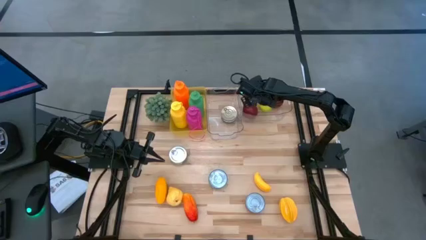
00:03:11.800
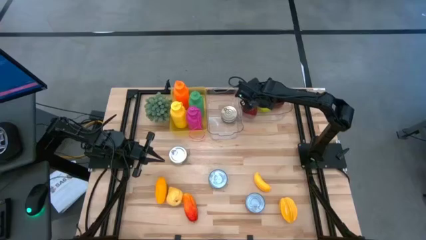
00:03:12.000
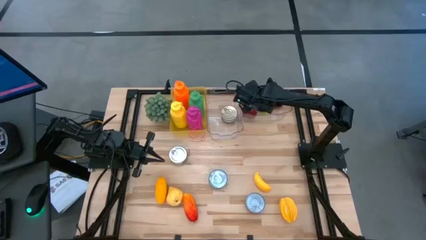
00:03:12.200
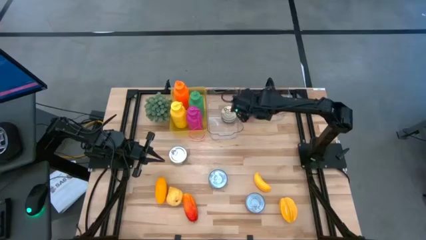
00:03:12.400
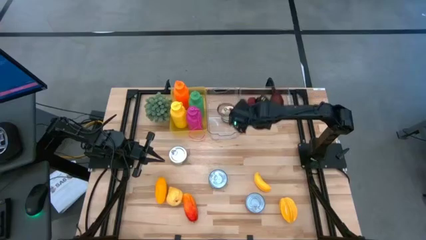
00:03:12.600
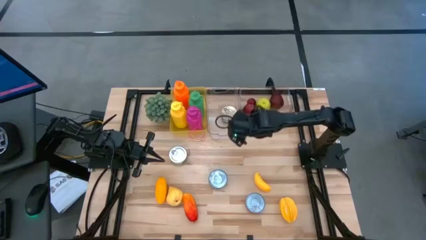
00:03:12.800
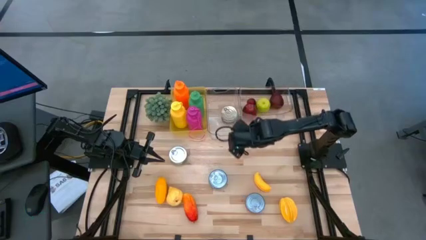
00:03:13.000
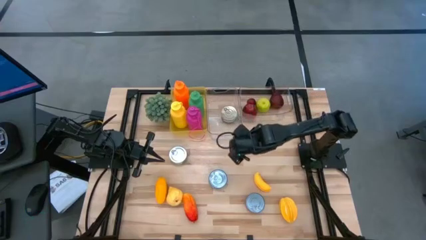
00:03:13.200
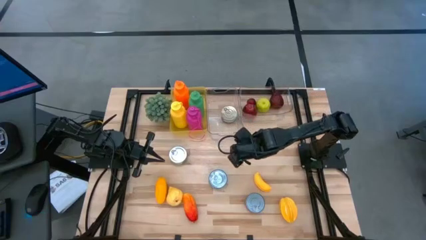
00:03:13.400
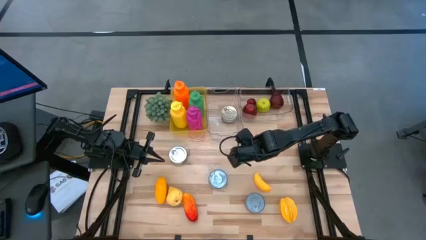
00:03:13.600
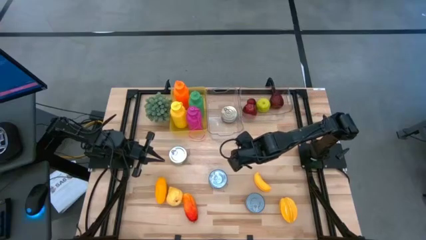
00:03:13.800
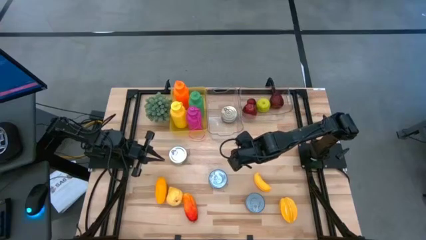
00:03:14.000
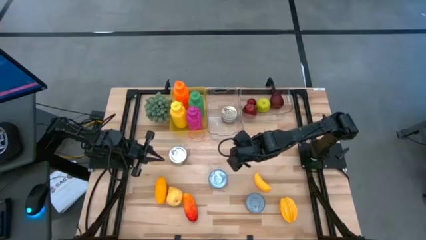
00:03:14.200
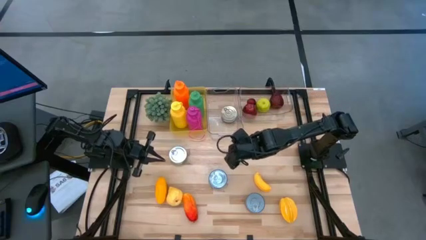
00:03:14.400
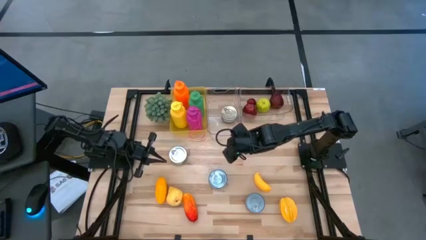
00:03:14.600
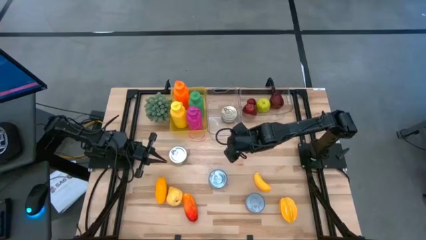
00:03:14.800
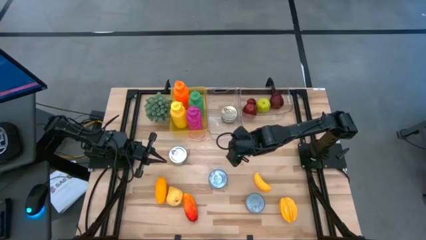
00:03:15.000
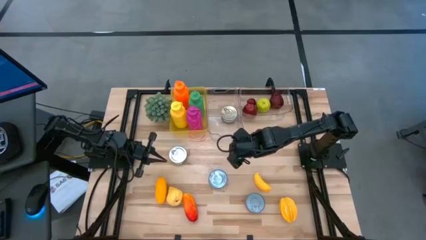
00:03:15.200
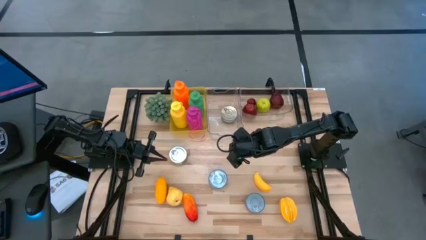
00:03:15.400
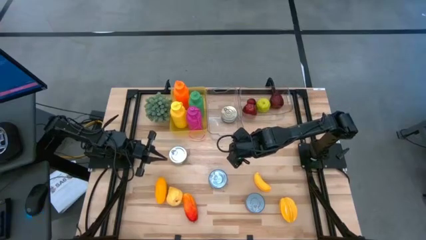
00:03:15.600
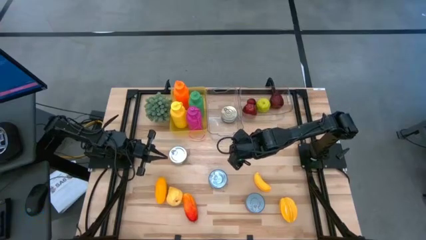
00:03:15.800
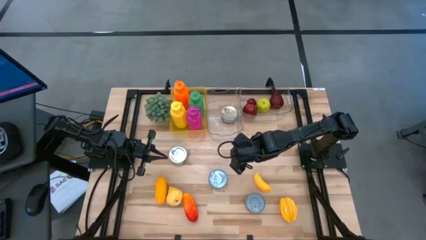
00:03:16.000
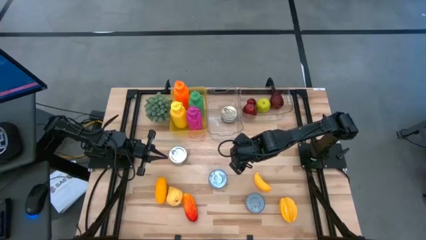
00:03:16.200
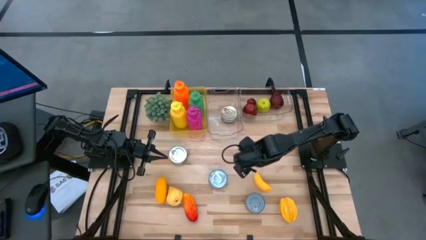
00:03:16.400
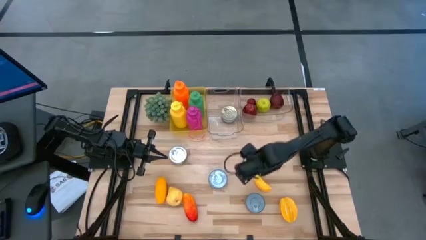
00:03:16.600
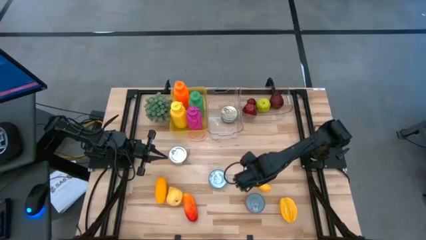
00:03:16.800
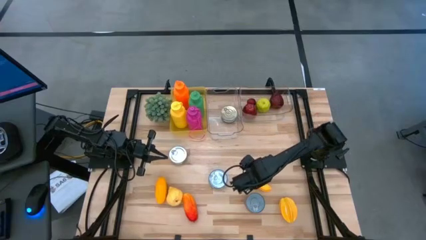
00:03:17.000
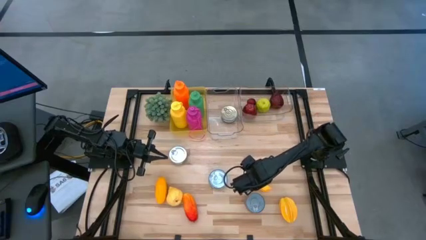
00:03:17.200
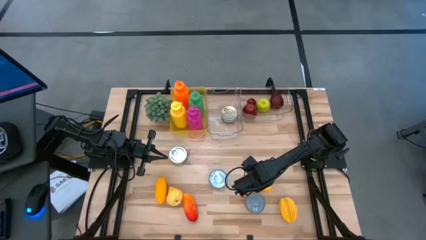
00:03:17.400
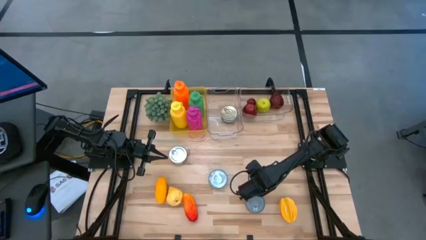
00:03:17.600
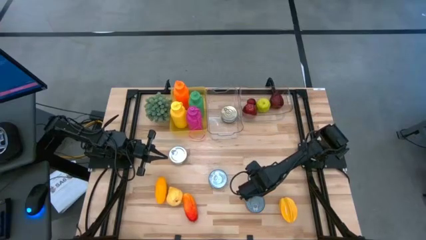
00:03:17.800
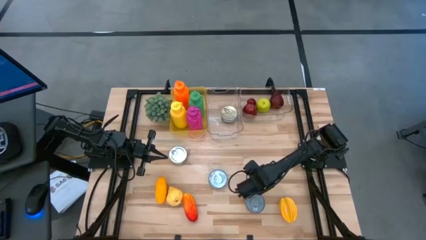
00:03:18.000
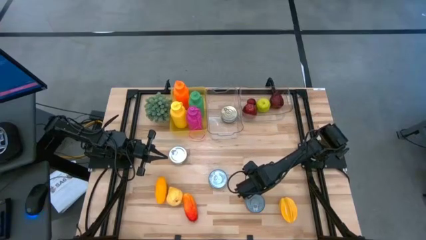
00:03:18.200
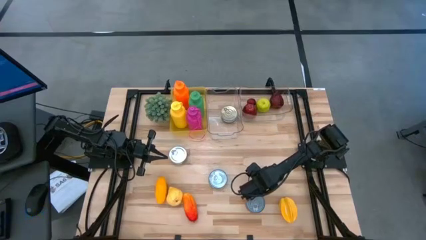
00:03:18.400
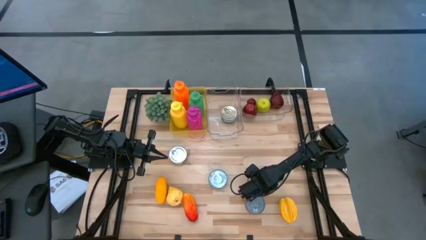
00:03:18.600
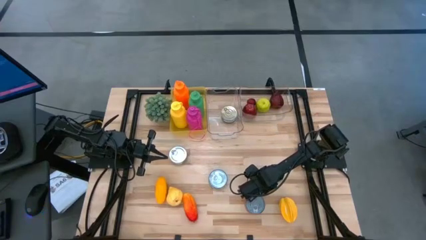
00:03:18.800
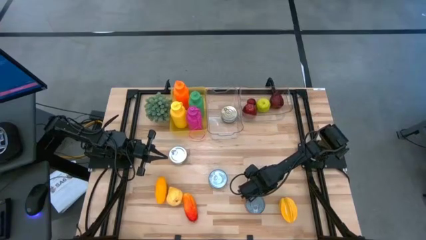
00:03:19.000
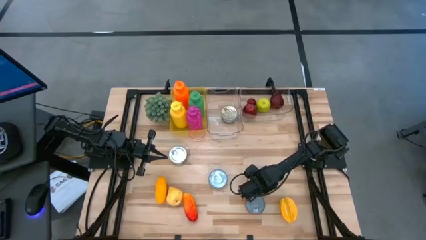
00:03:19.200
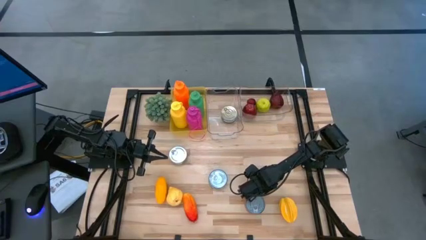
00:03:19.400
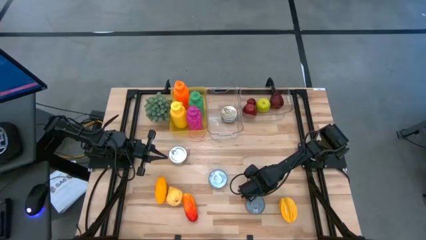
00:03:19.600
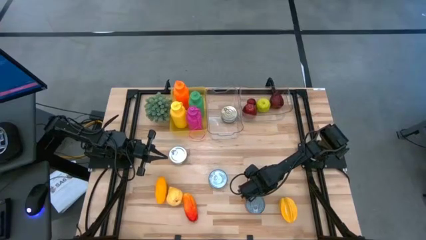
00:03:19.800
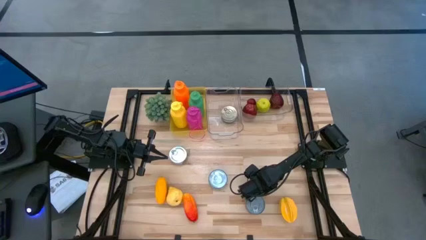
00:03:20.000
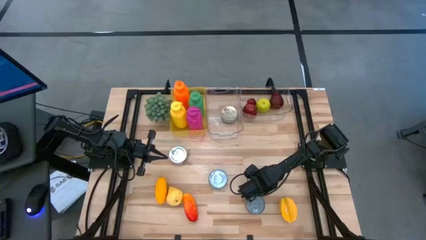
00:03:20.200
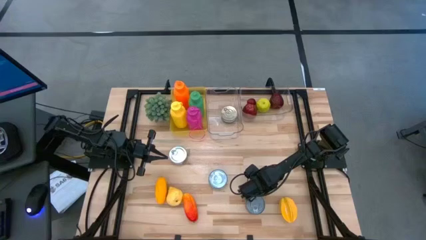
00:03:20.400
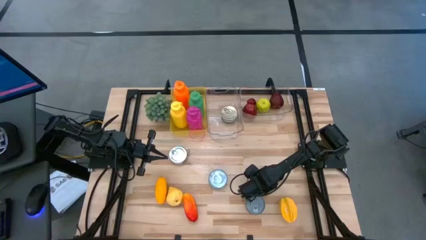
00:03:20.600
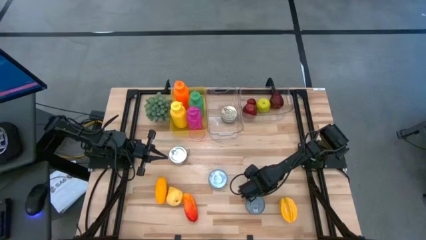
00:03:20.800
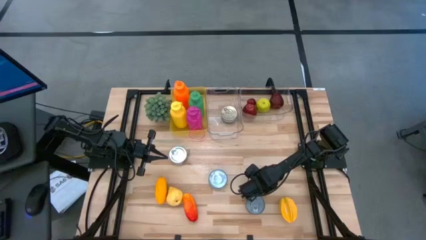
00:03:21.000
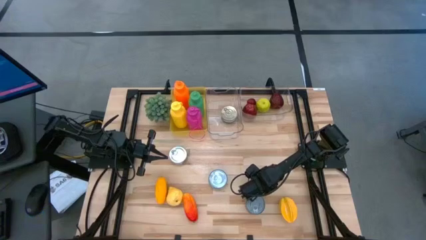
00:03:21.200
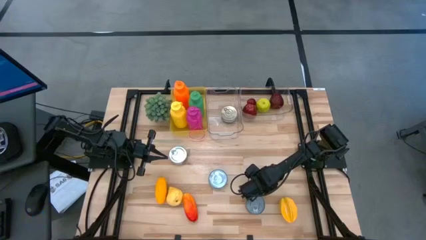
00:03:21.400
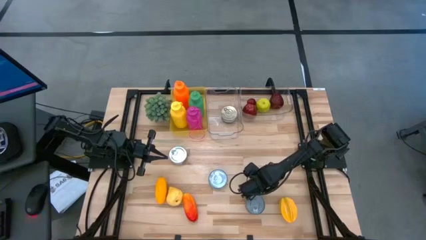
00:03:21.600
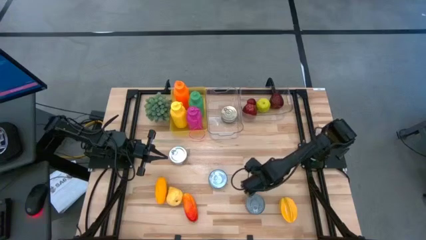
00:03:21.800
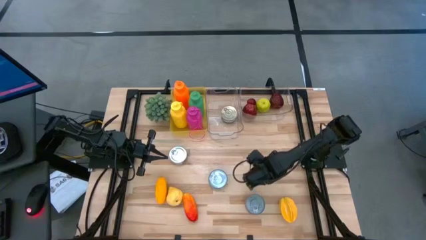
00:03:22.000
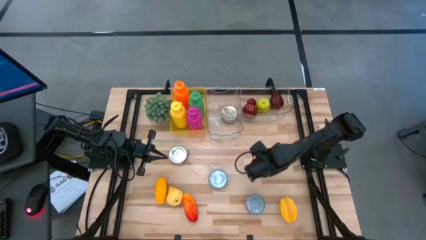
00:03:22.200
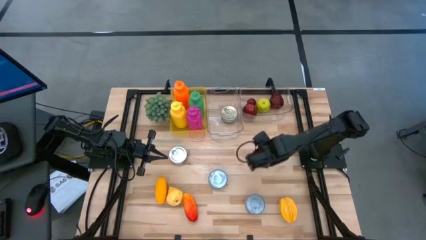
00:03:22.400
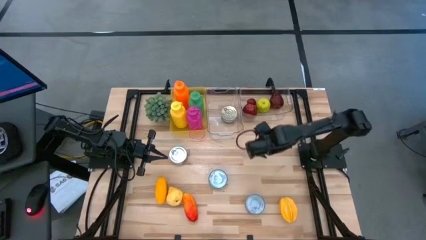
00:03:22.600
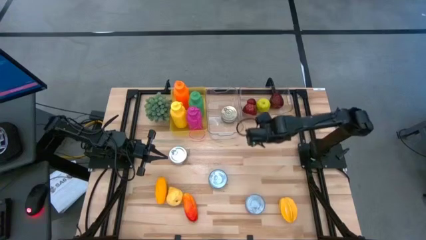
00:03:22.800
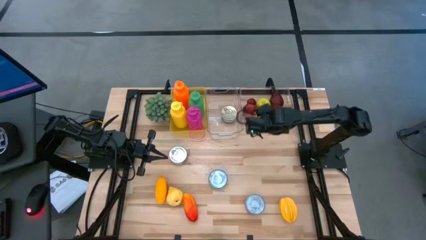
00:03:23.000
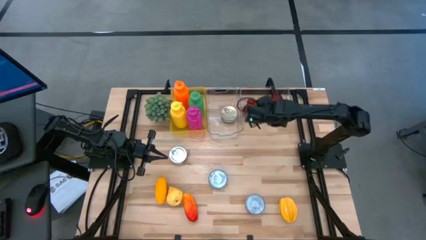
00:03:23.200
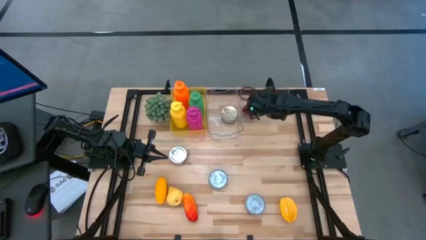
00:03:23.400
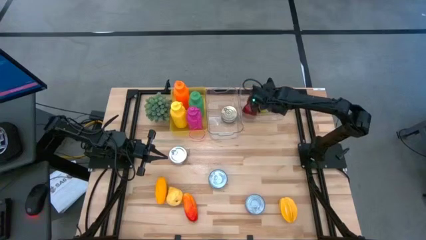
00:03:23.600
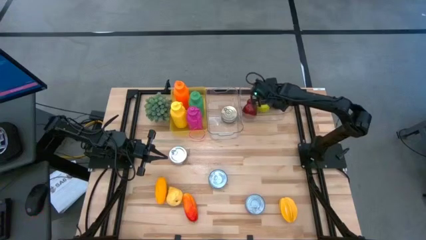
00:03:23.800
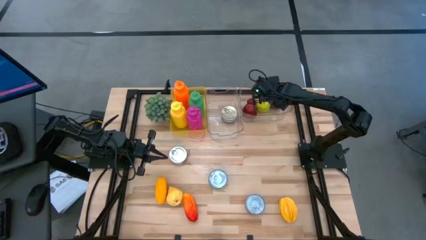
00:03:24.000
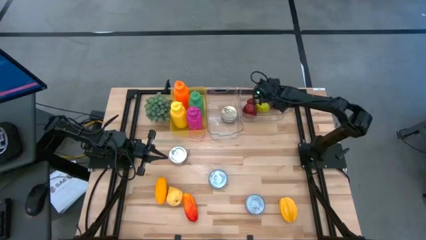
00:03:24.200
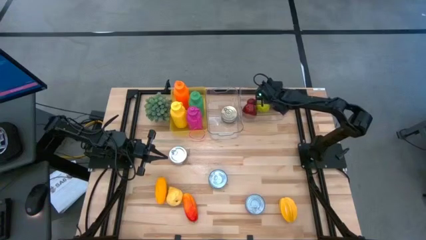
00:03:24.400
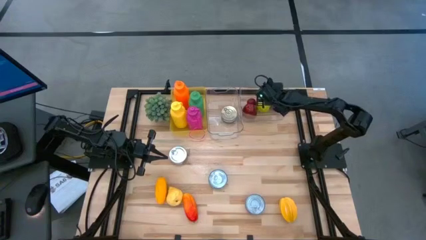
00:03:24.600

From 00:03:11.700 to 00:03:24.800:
Task: Pick & Place Food Item
Put the yellow banana into the right transparent bin
